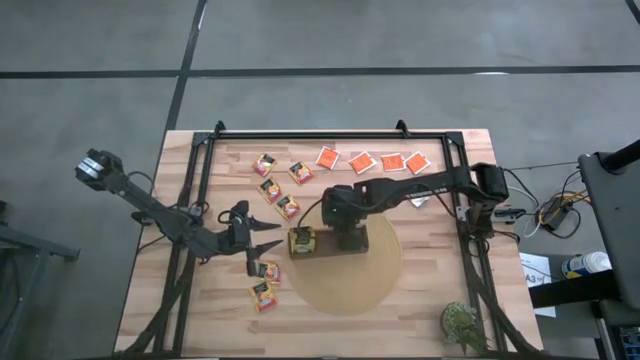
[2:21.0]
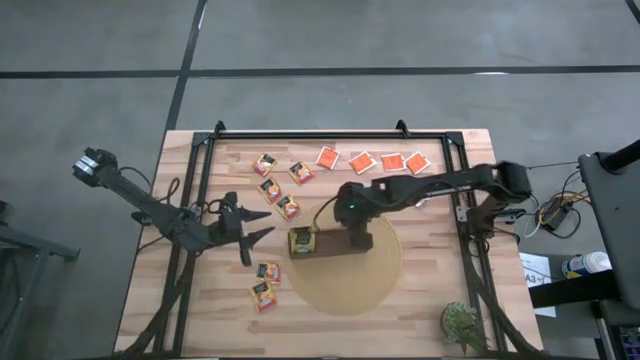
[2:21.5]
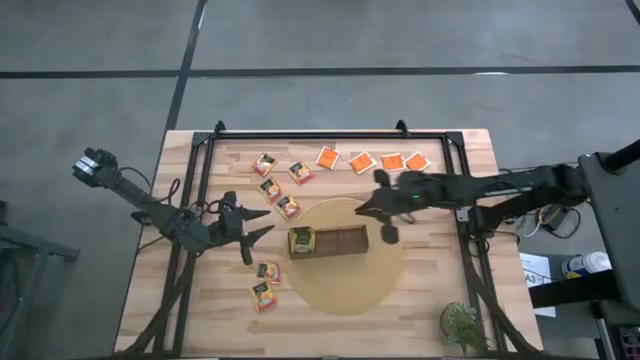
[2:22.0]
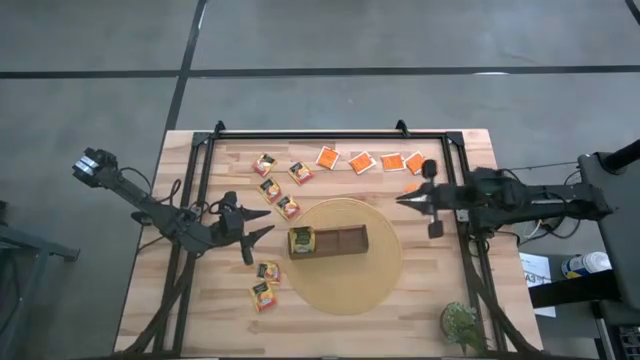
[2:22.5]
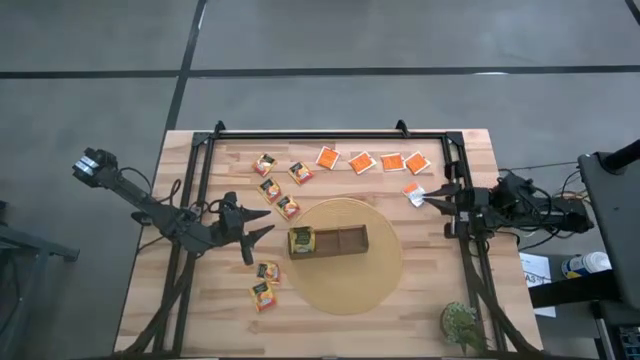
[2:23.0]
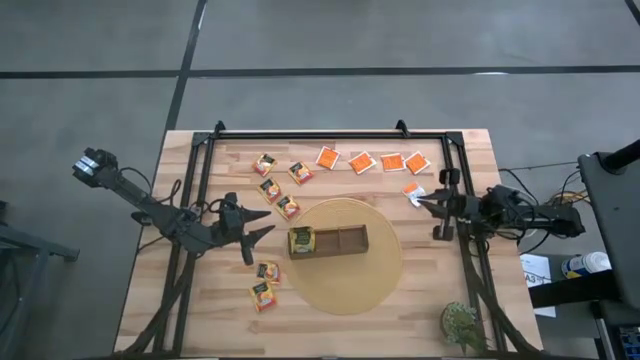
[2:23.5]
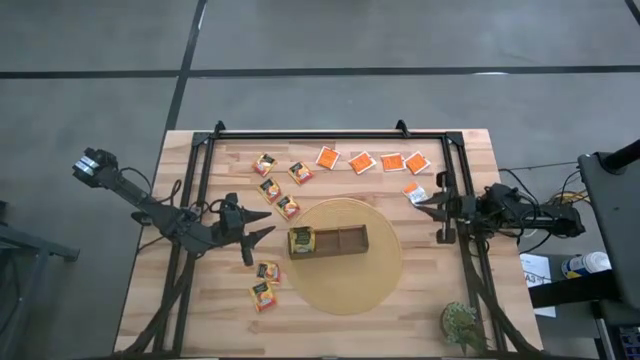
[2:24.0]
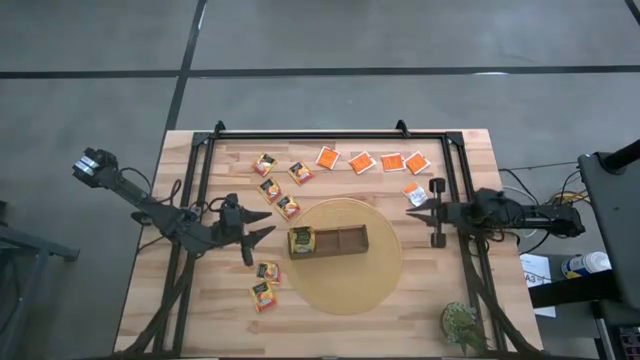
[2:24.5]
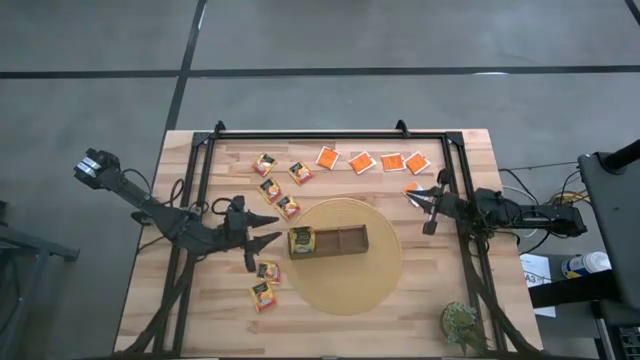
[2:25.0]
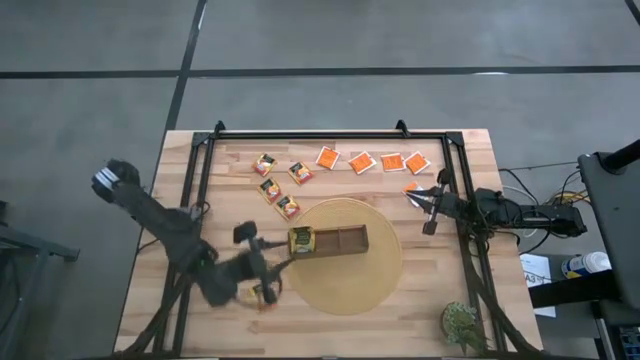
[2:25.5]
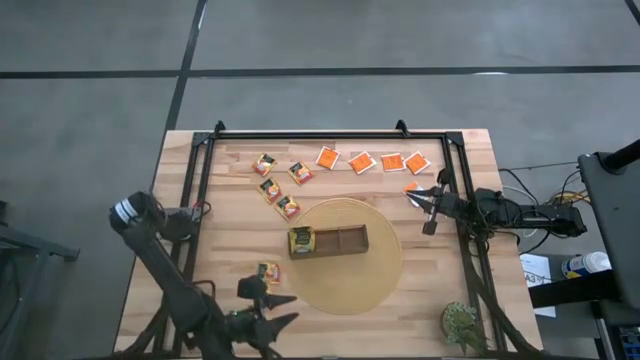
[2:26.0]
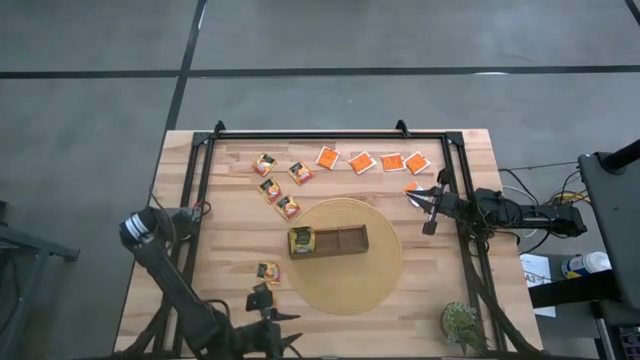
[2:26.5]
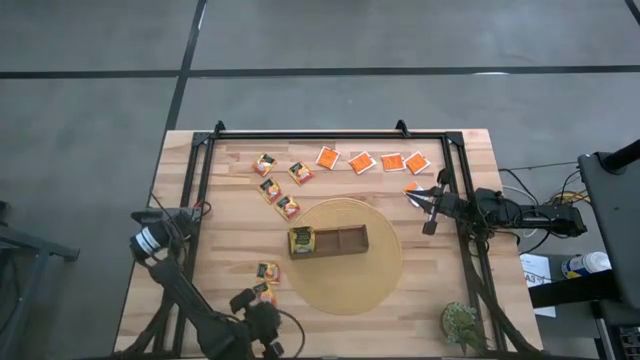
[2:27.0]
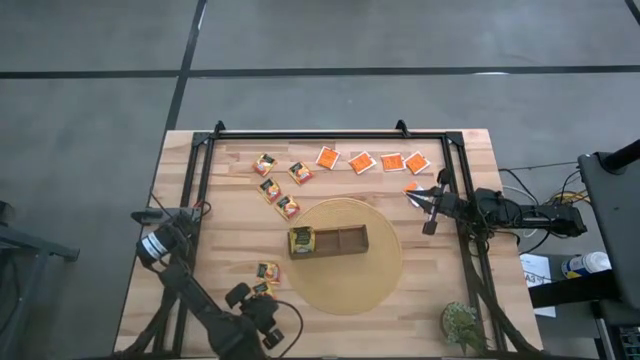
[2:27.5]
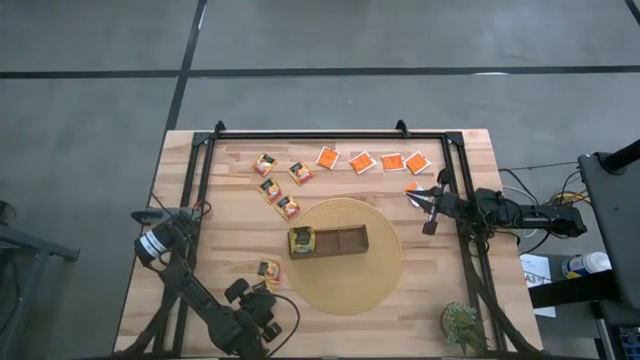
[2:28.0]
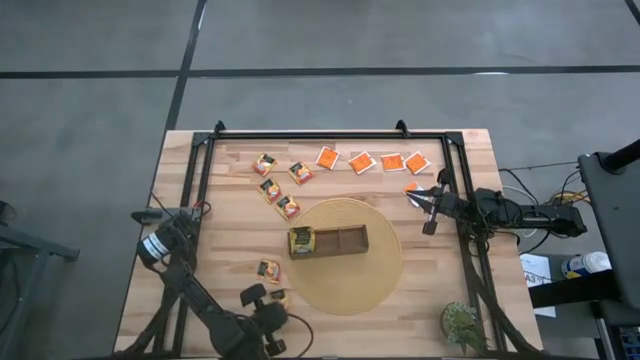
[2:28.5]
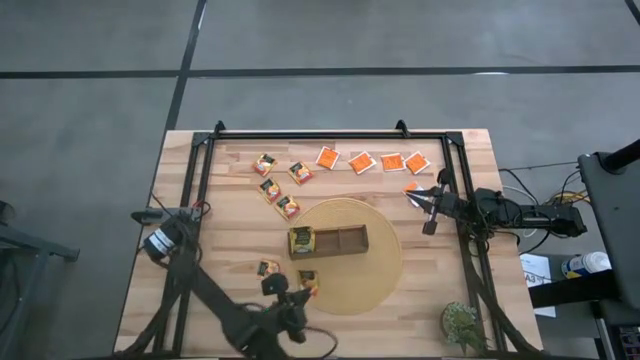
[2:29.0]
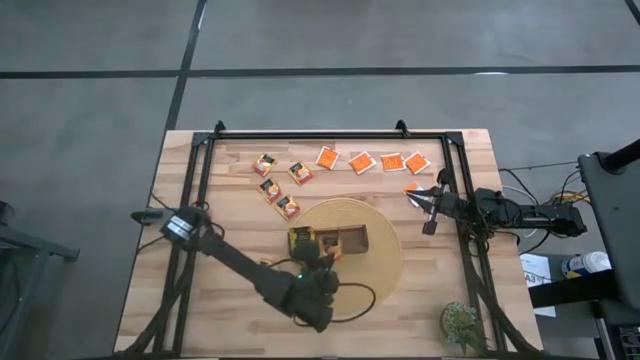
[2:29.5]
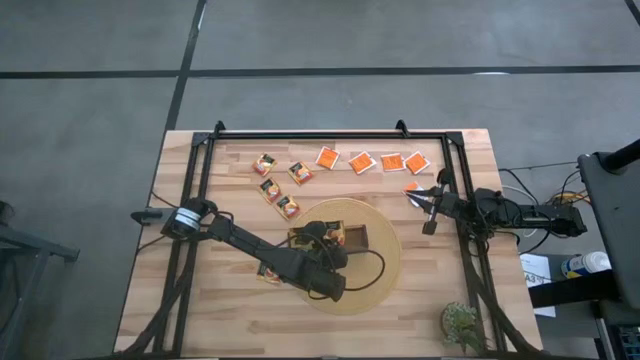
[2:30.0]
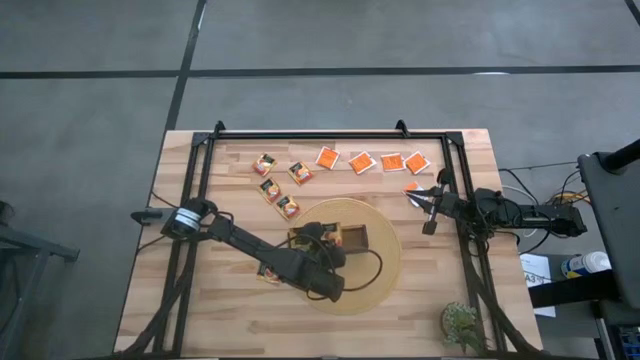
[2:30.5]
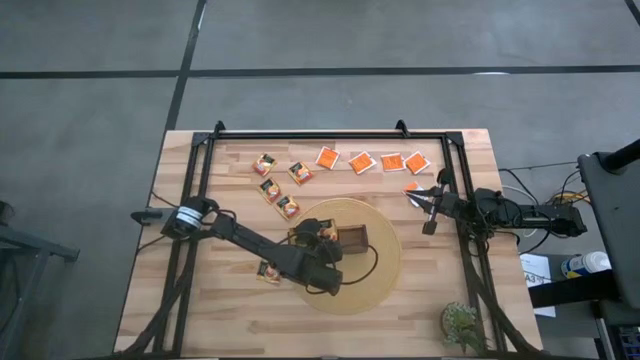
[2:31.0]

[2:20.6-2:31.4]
Task: Pick & Place Tea
Put the yellow tea bag into the middle section of the wooden organizer

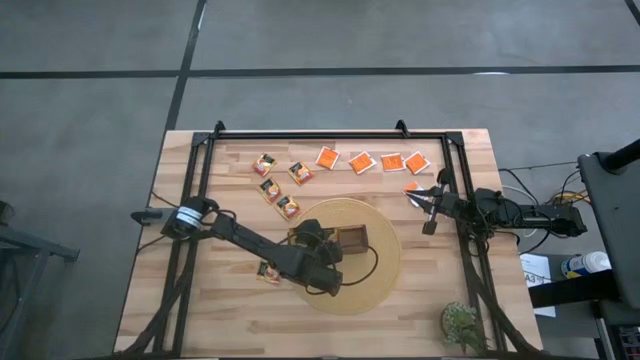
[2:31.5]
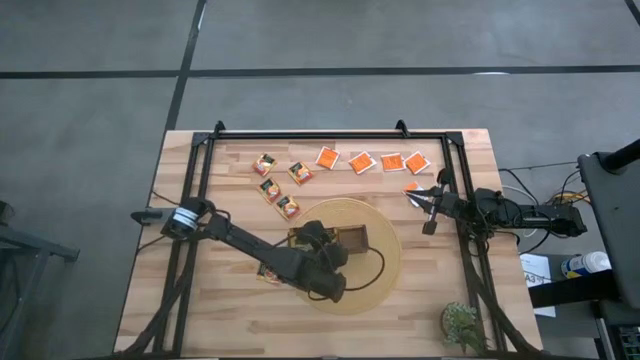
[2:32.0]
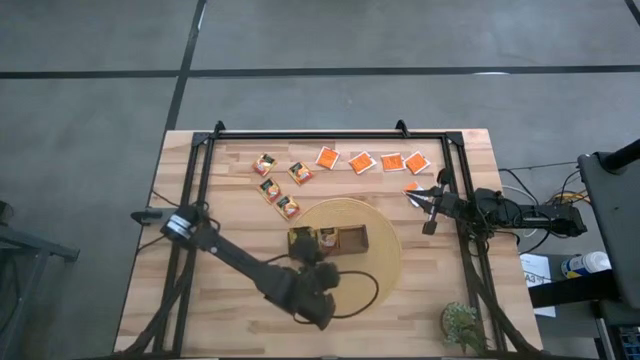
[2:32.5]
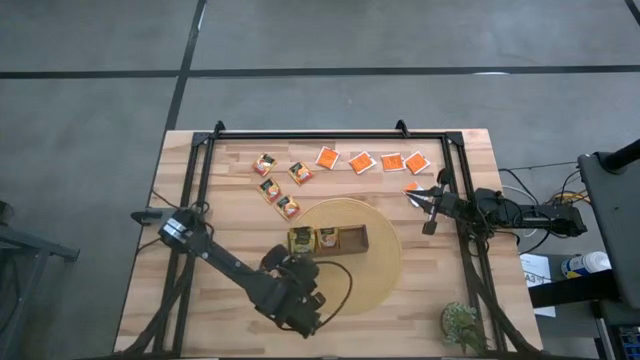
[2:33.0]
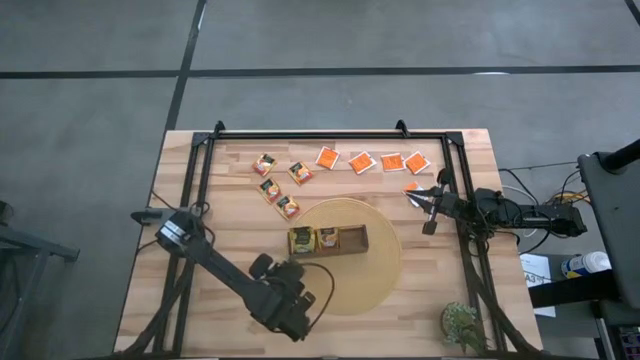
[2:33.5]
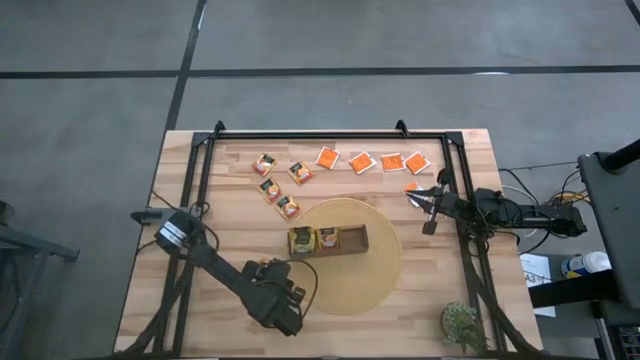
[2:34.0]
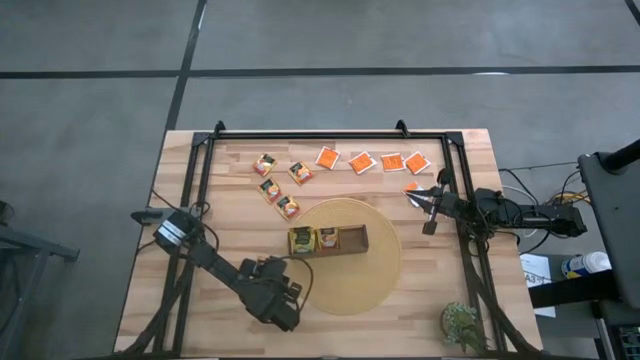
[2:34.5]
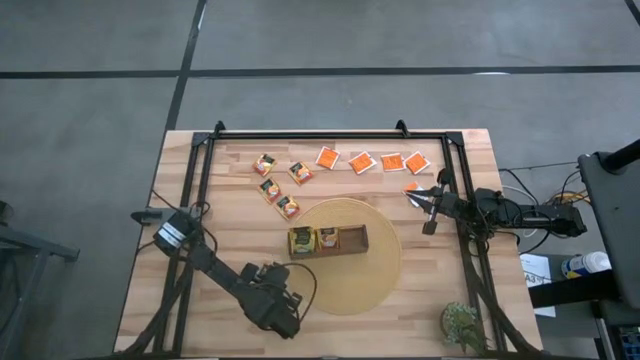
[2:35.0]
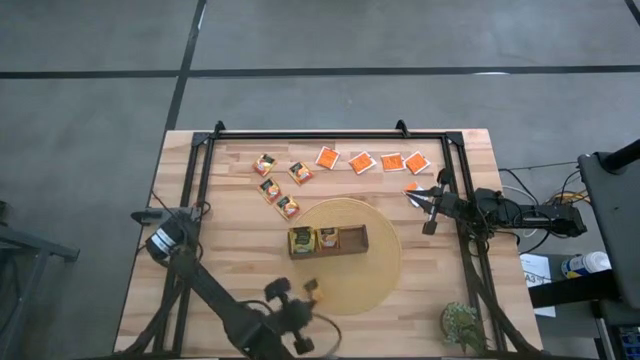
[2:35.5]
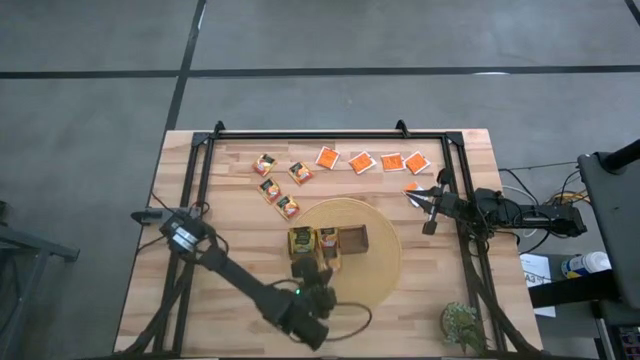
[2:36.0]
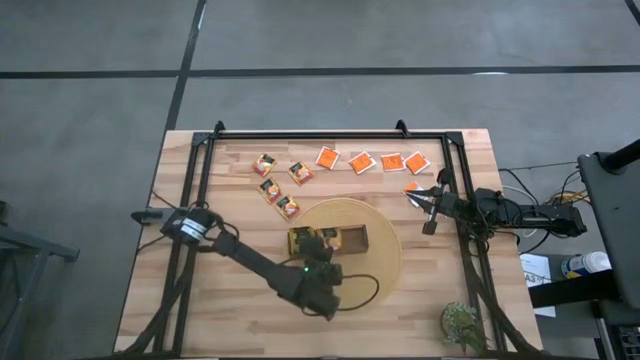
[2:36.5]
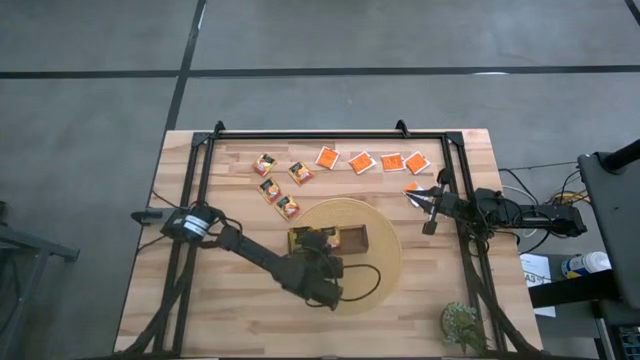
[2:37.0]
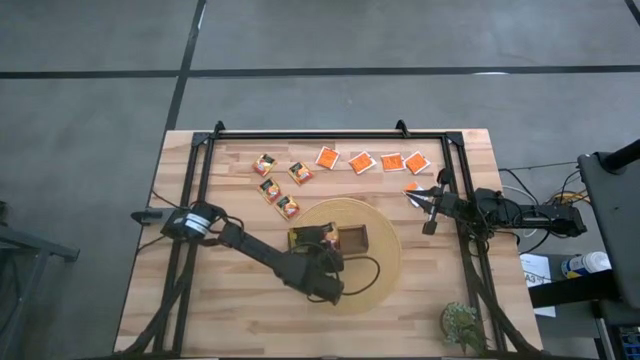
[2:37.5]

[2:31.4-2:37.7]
Put the yellow tea bag into the middle section of the wooden organizer

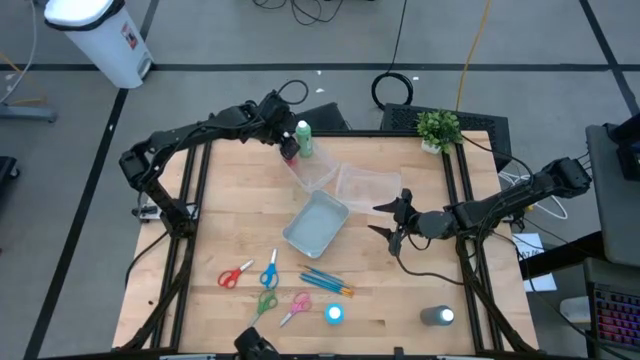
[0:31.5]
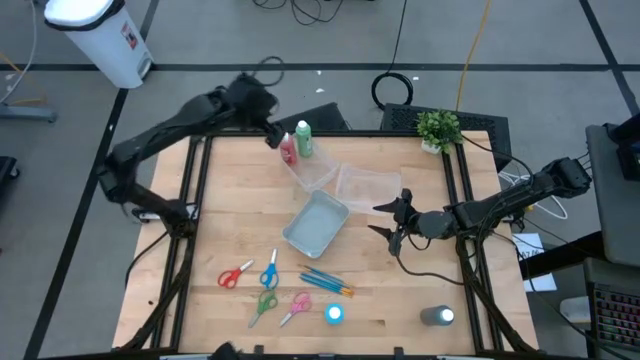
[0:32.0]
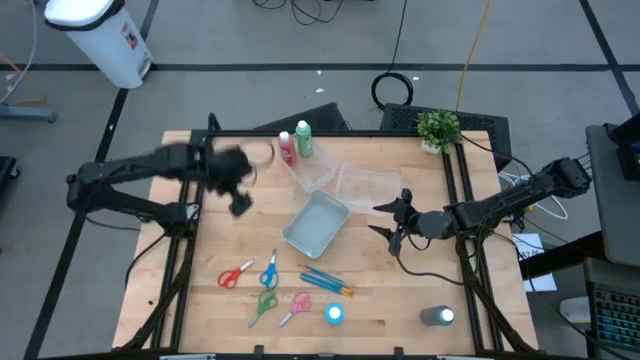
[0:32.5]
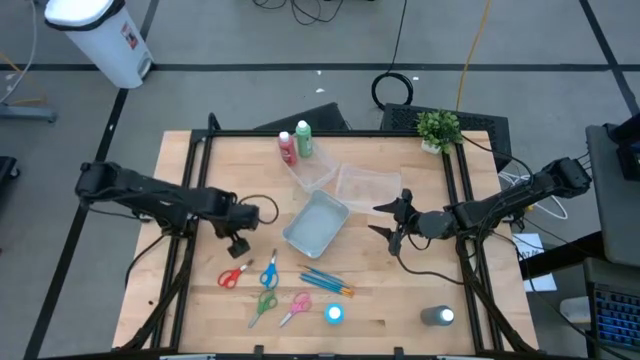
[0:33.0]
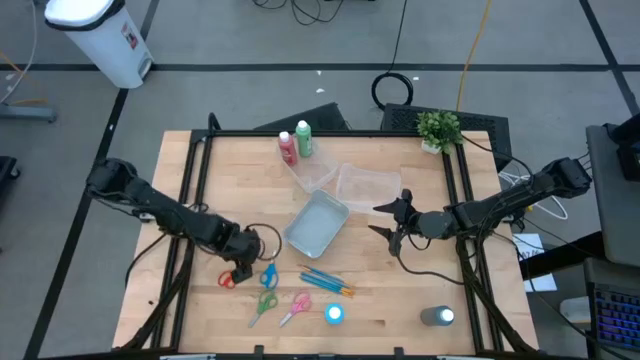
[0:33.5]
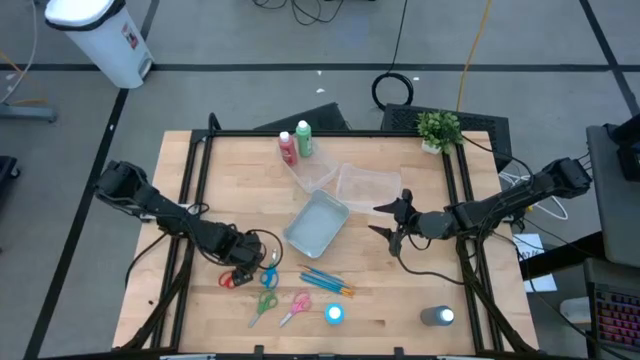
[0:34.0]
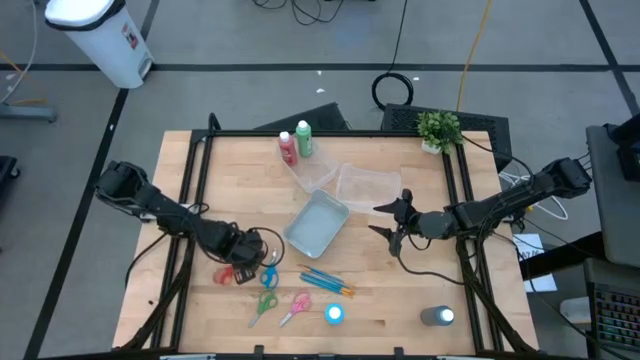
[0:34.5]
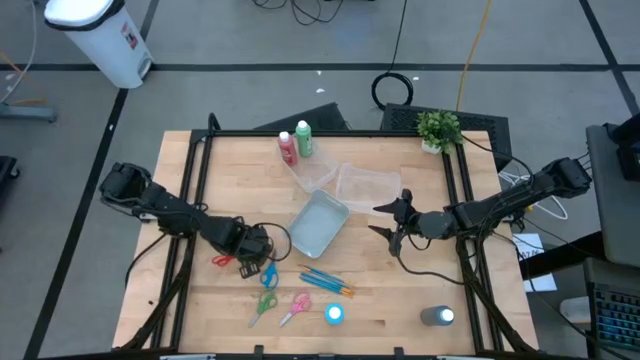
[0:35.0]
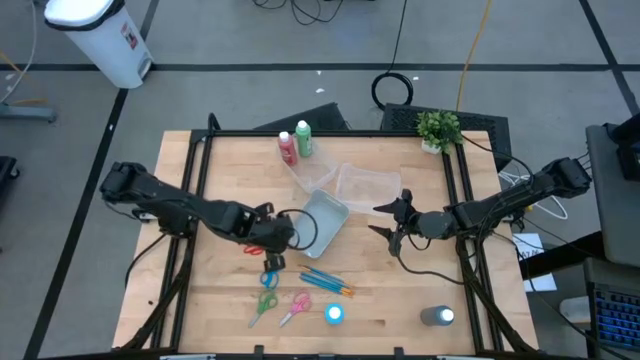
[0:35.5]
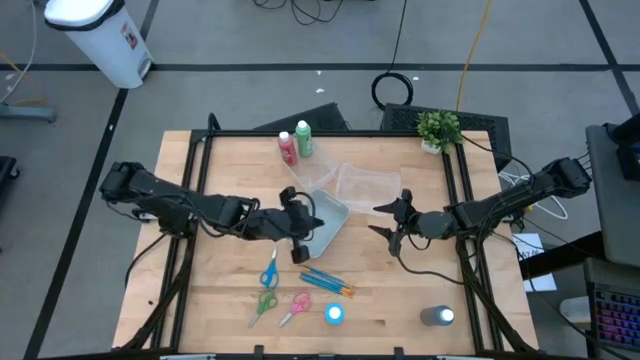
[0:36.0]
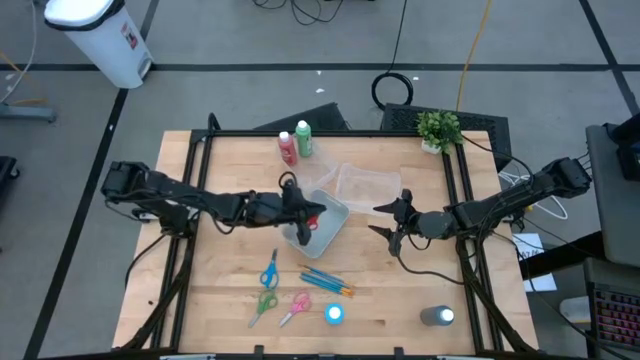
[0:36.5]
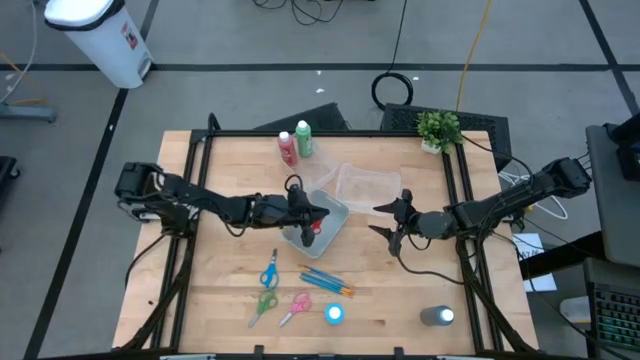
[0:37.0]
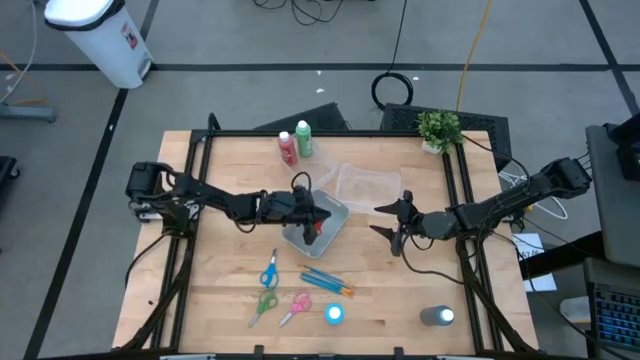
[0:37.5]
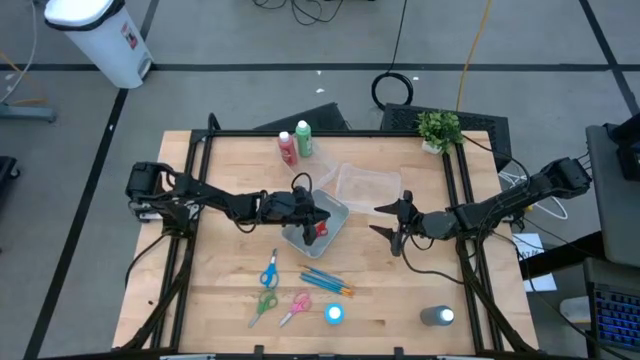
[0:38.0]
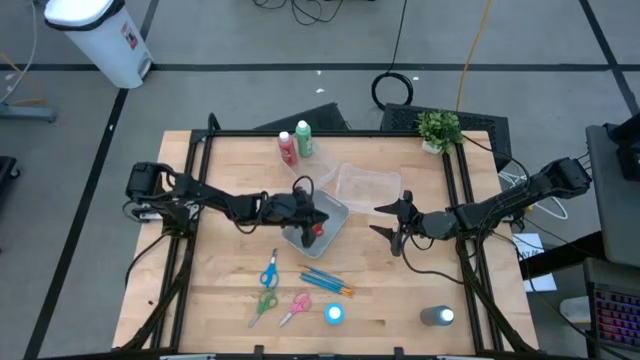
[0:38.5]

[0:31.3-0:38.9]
Task: Pick & Place Paint Supplies
Put the red scissors into the blue bin
